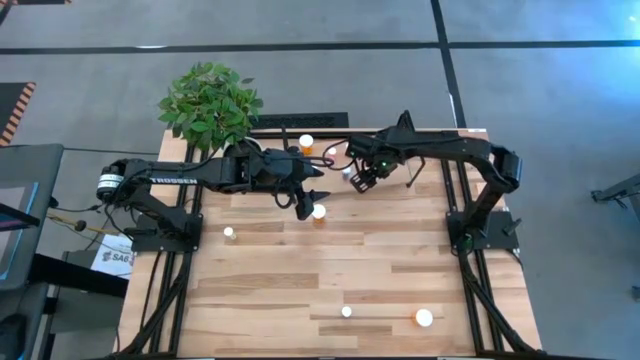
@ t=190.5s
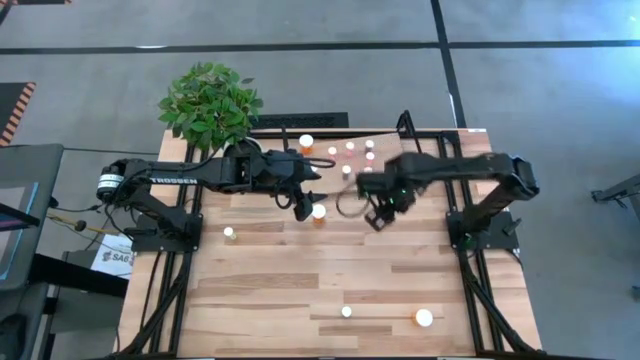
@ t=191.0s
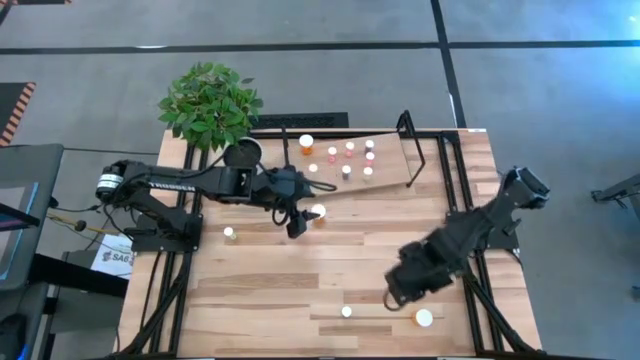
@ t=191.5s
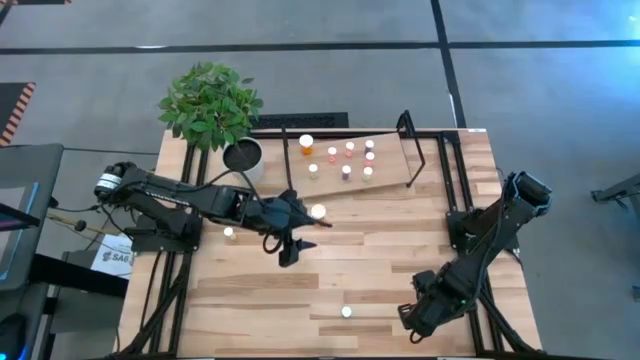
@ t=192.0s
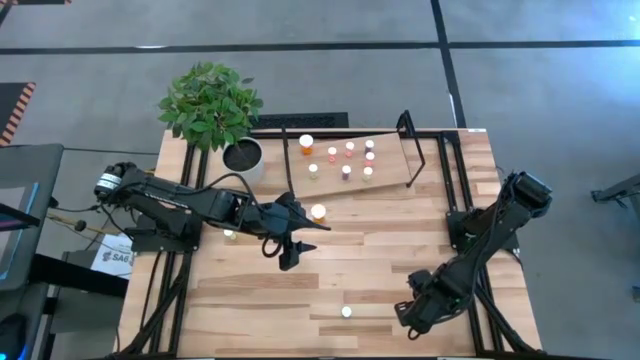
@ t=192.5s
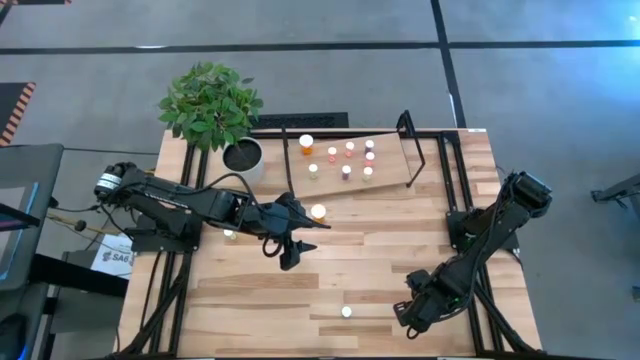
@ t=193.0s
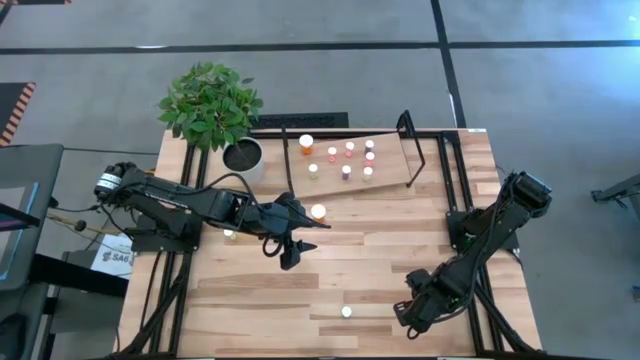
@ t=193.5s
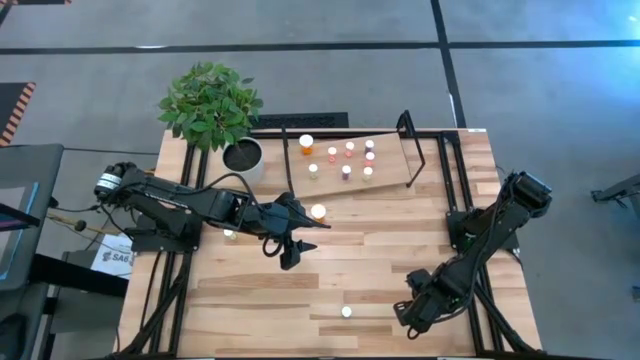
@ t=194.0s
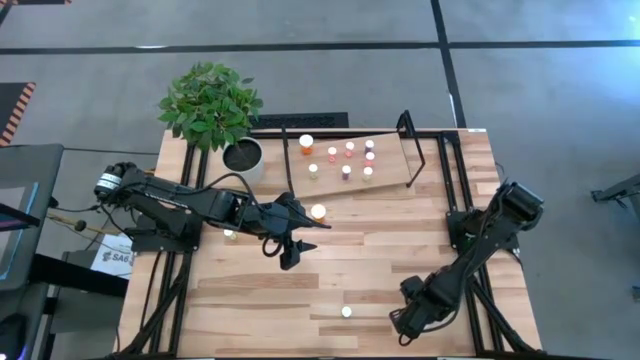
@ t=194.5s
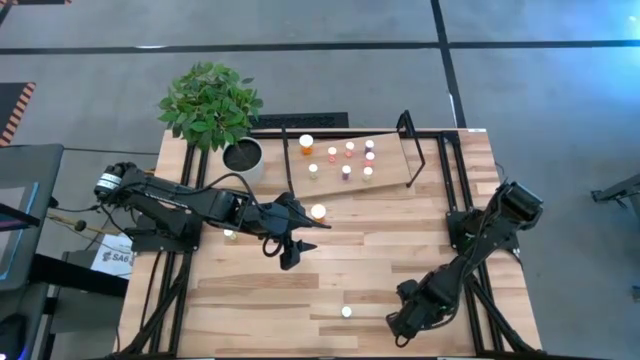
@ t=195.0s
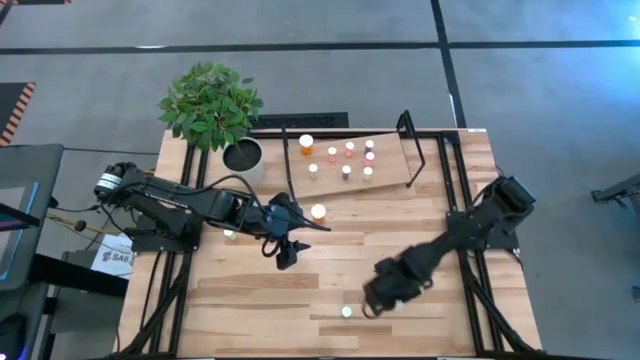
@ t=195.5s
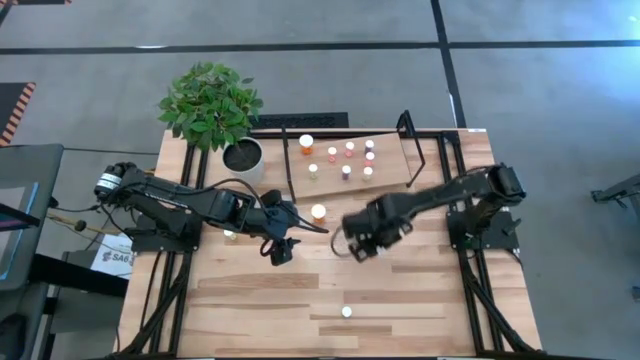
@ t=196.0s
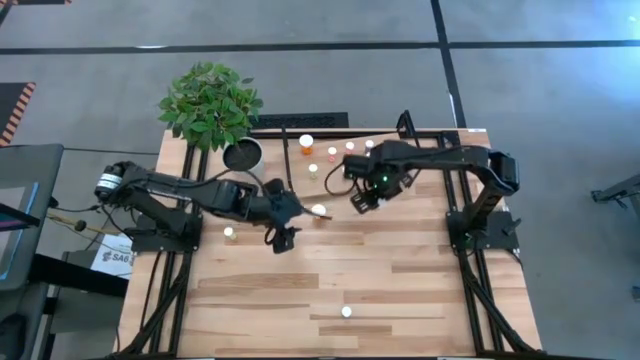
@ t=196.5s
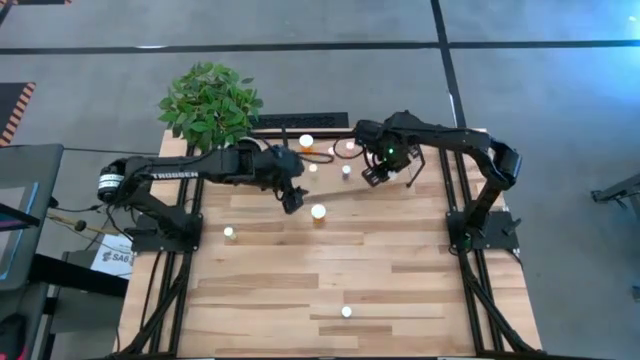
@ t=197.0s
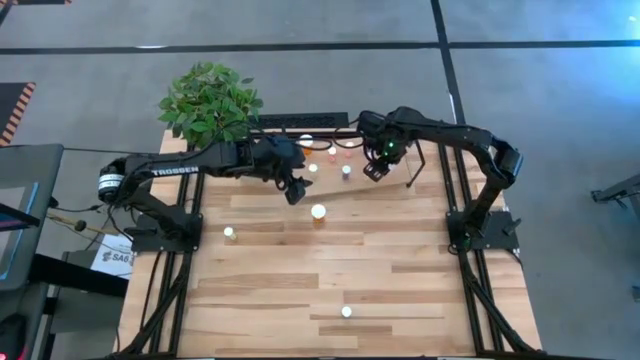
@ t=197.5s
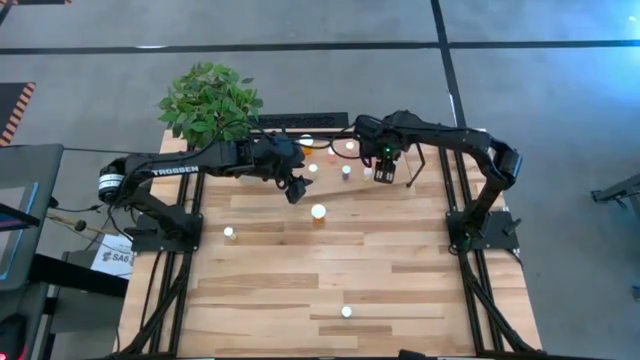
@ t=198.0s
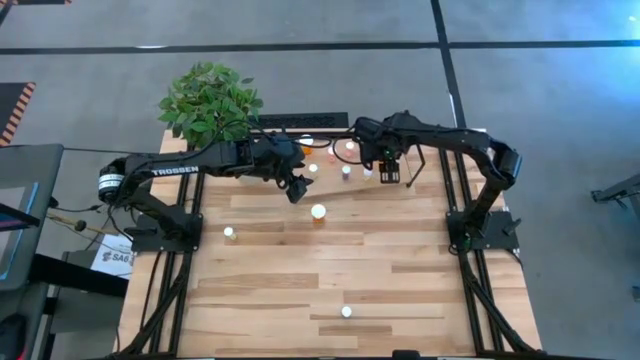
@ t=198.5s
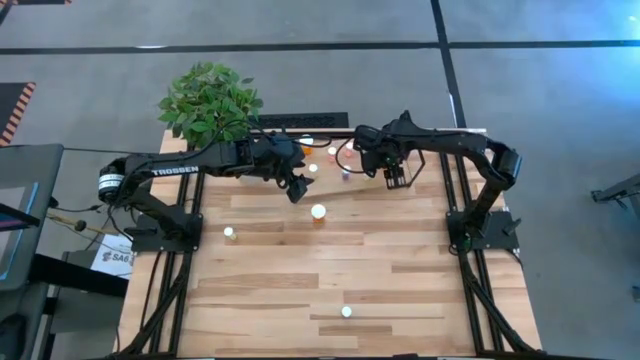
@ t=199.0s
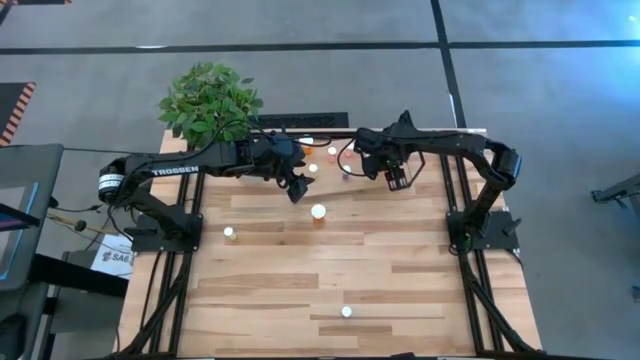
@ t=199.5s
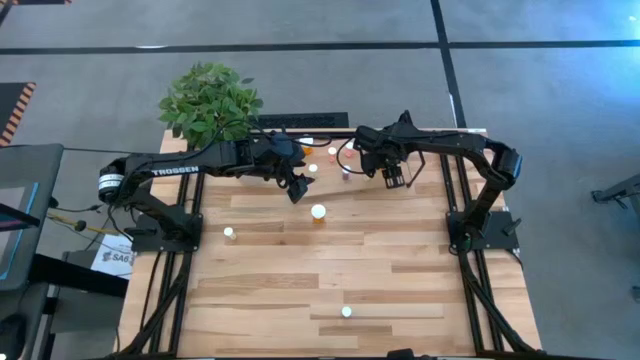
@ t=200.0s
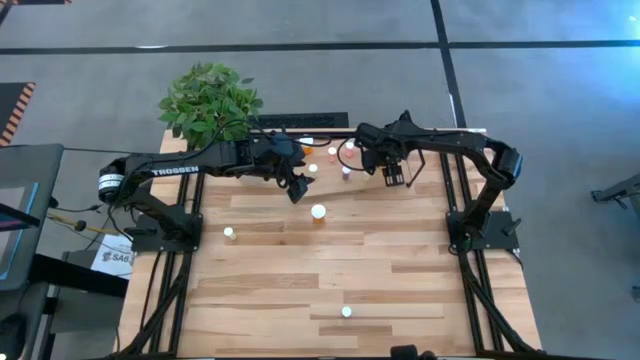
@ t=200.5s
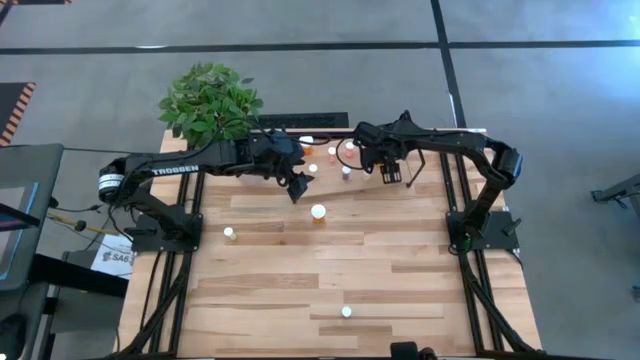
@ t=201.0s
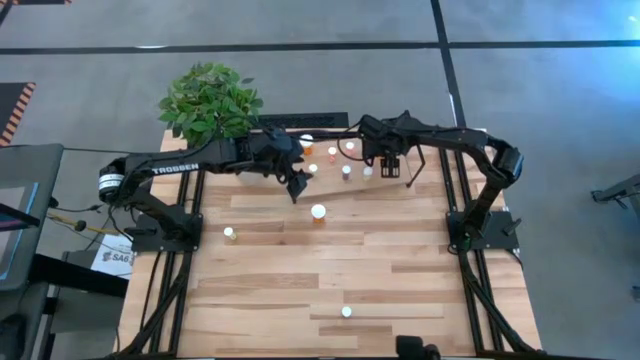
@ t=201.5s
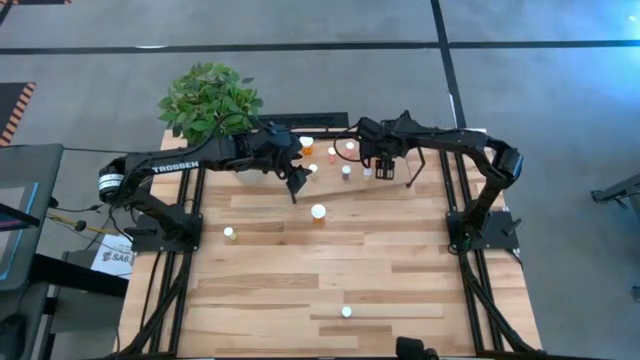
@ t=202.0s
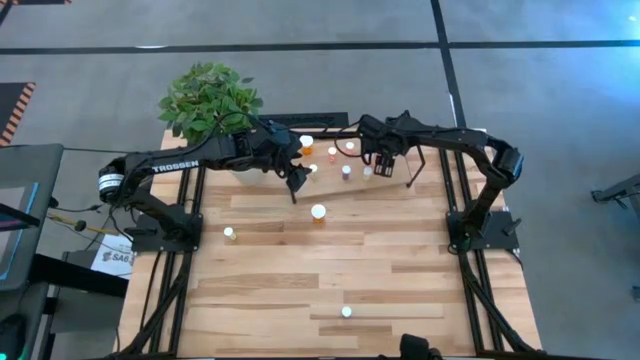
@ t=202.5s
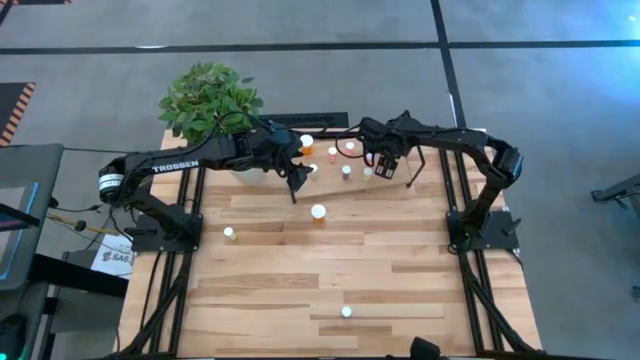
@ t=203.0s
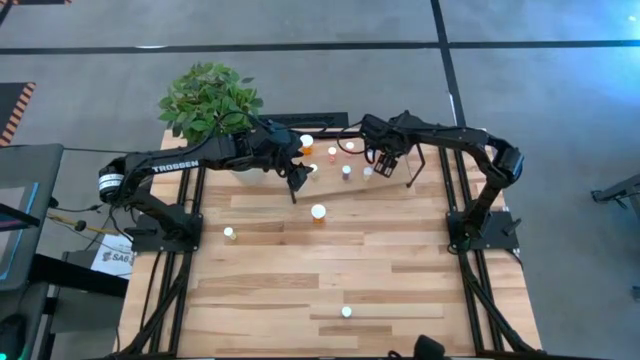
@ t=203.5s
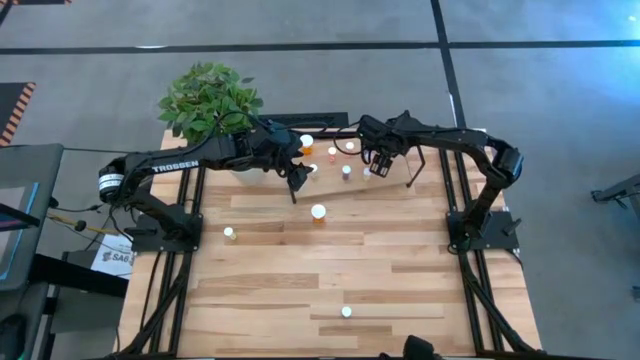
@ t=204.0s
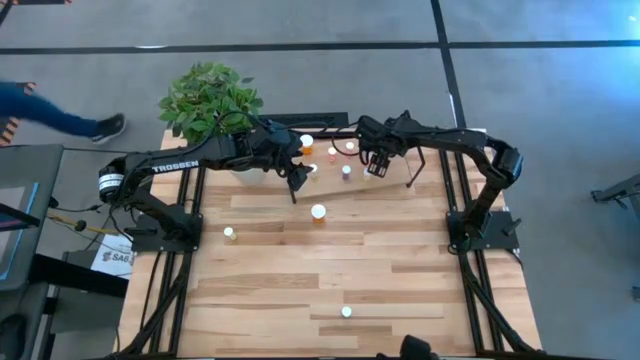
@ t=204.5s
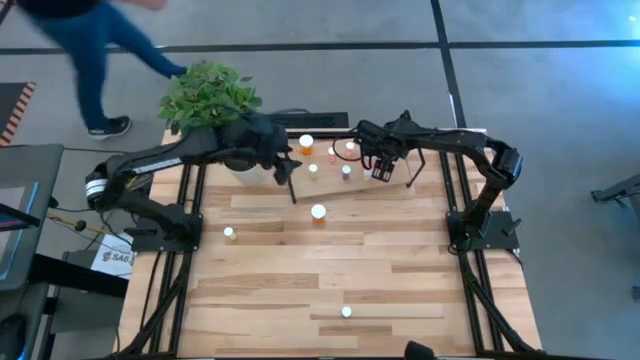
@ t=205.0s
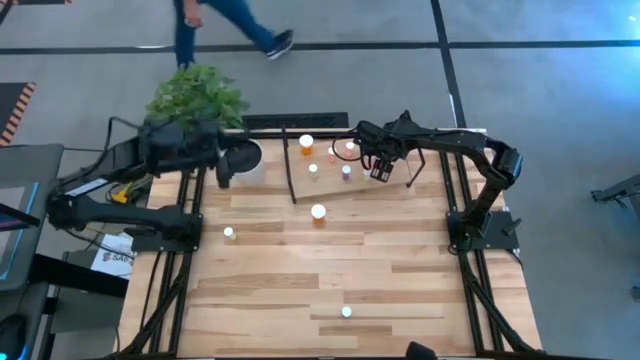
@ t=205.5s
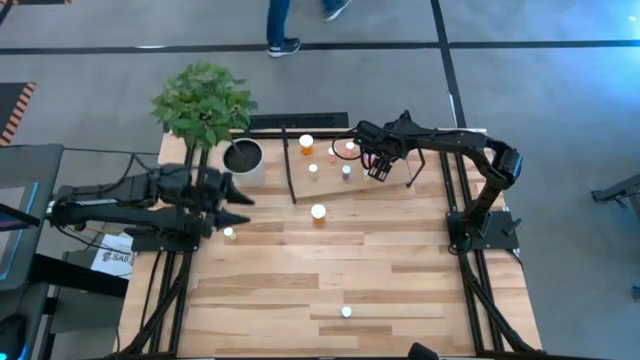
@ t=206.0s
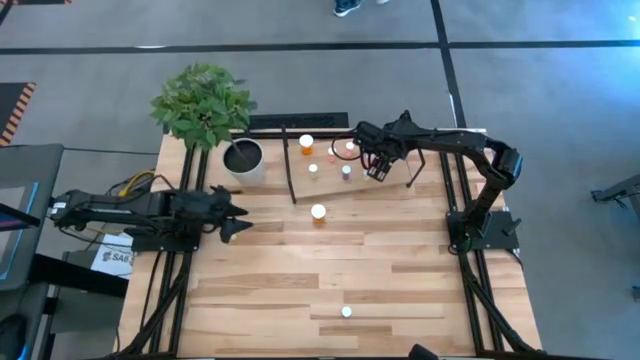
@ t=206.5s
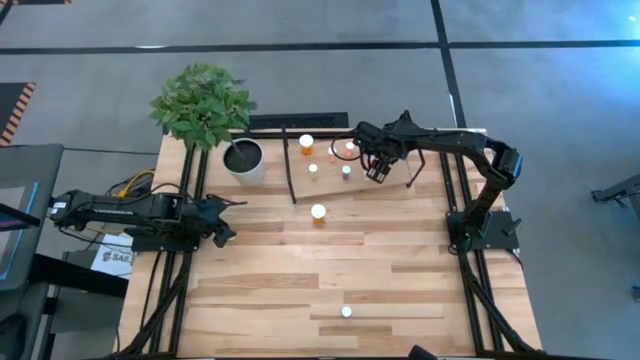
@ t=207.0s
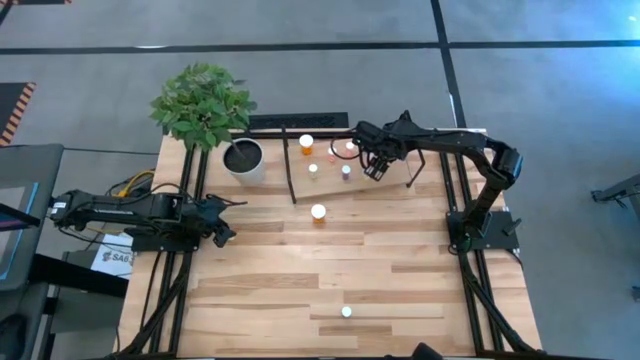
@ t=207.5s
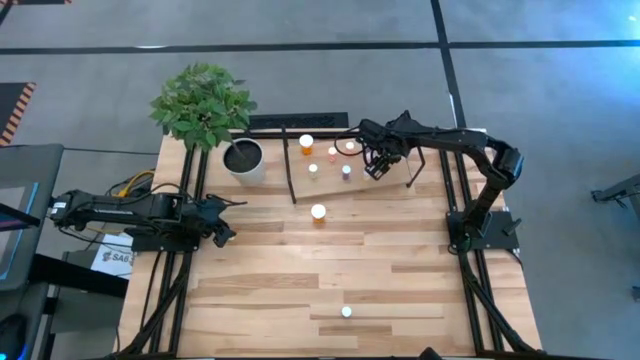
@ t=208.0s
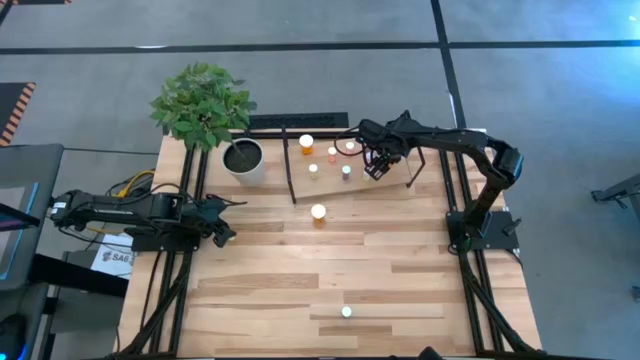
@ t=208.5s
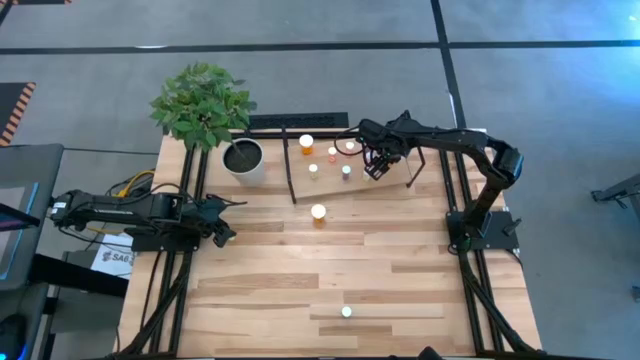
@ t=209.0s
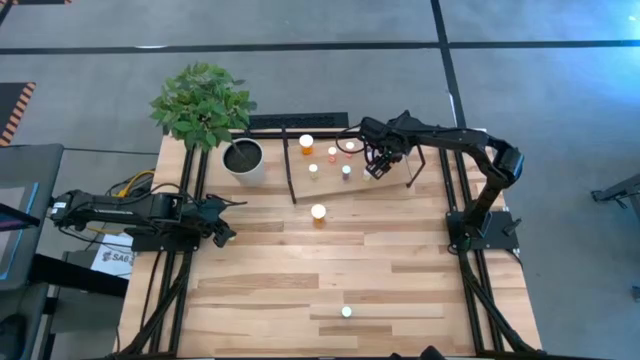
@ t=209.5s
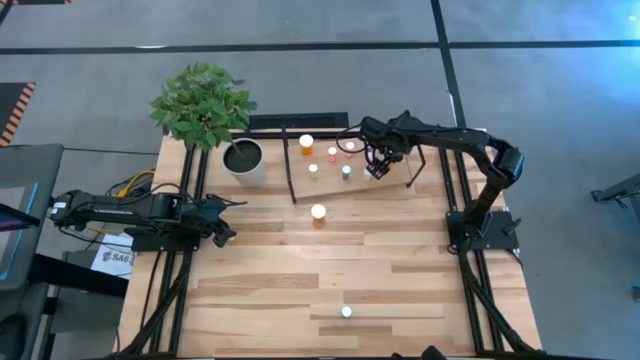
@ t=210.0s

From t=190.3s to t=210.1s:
Task: Pick and place medicine bottles onto shelf by color
Put the bottom orange pill bottle on the shelf

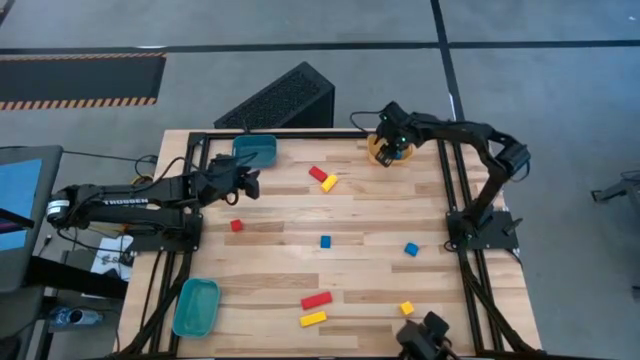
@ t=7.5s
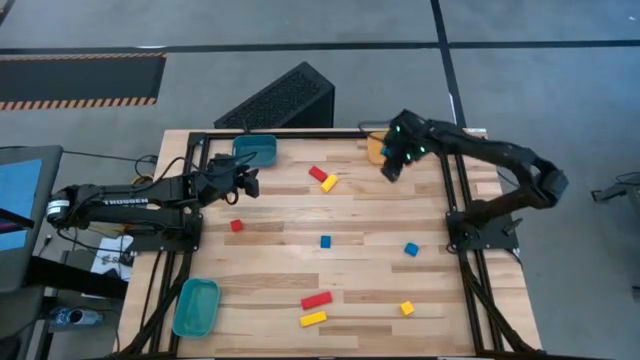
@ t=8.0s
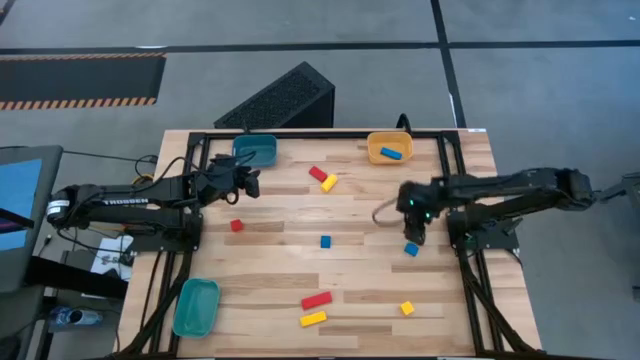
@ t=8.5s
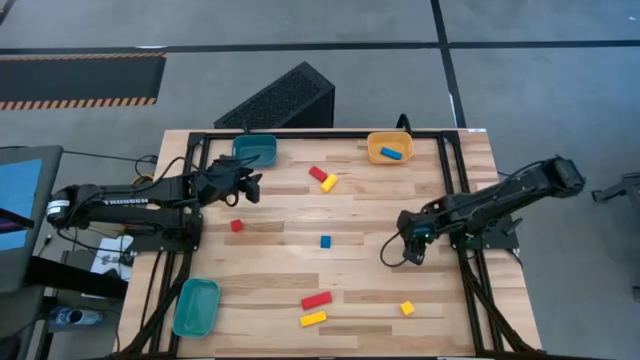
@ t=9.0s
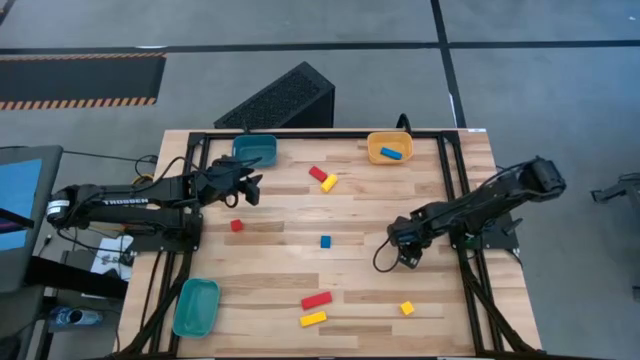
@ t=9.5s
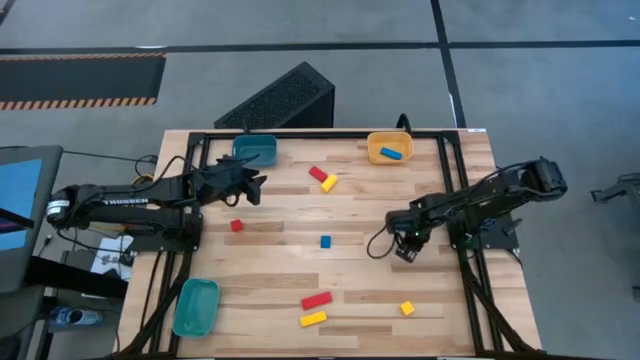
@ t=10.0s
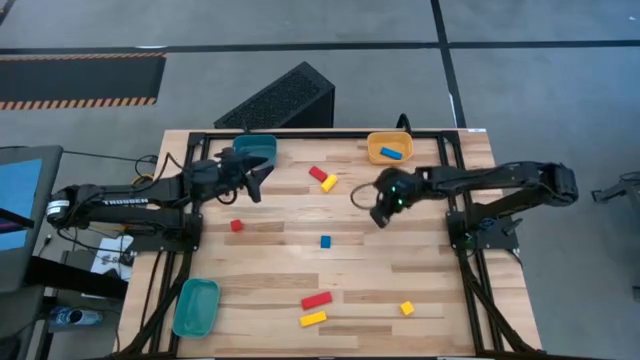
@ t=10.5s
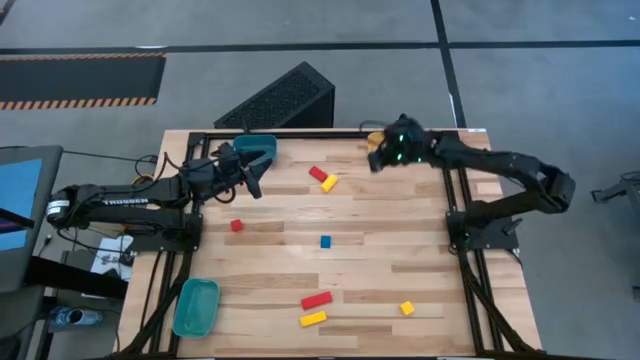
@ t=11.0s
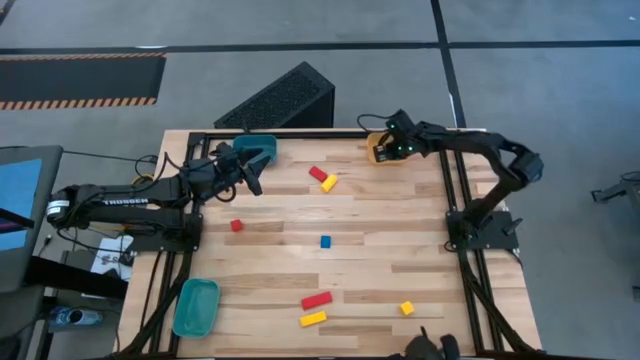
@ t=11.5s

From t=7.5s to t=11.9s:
Task: Sort & place blocks by color
Put the right blue block into the yellow bin
